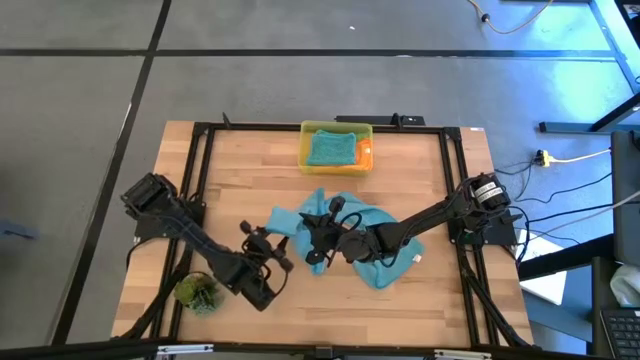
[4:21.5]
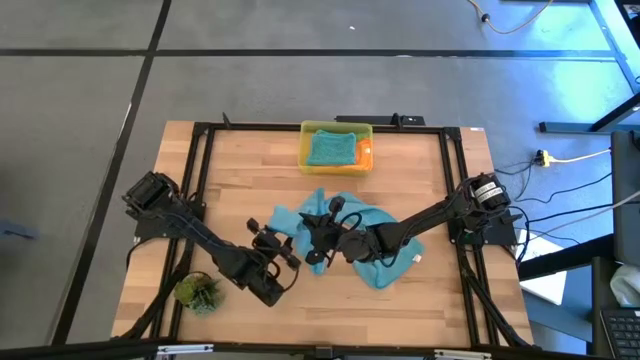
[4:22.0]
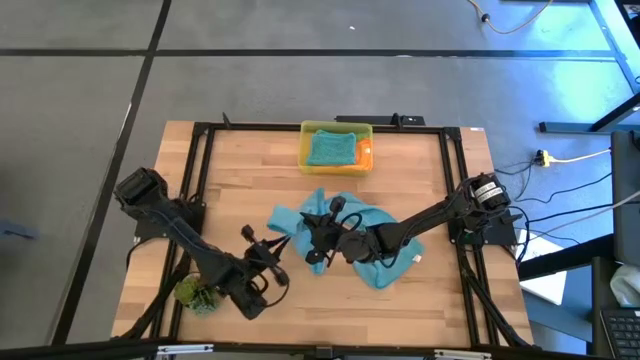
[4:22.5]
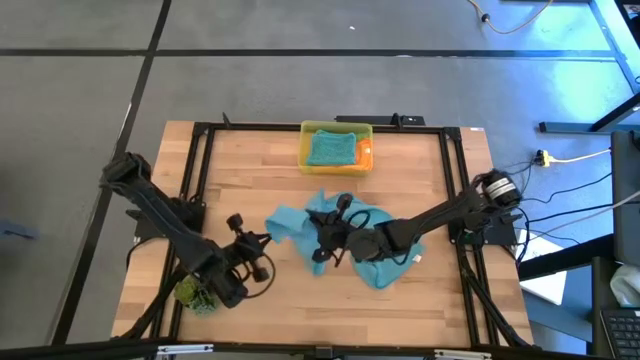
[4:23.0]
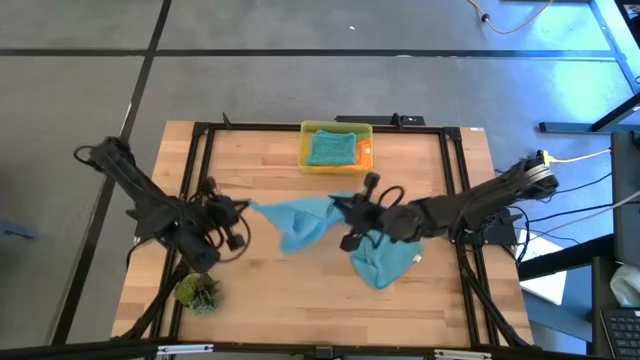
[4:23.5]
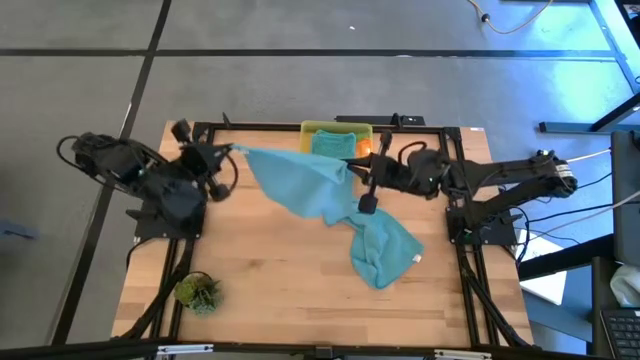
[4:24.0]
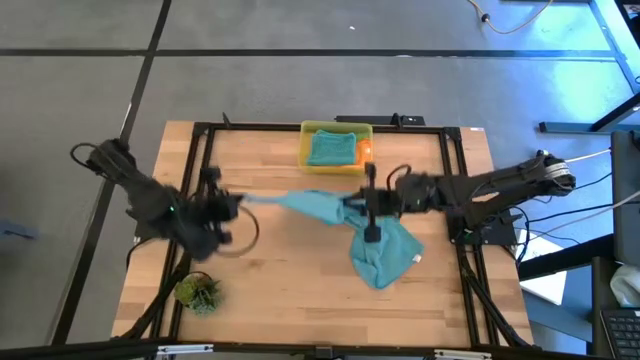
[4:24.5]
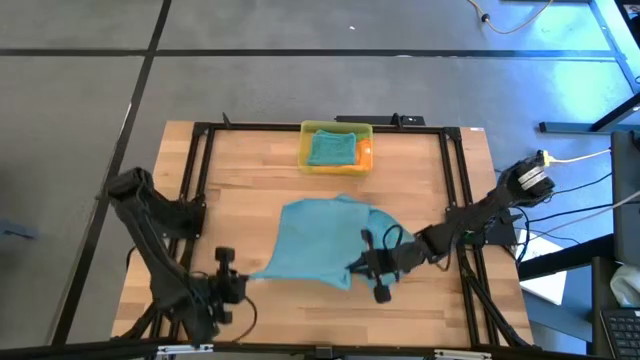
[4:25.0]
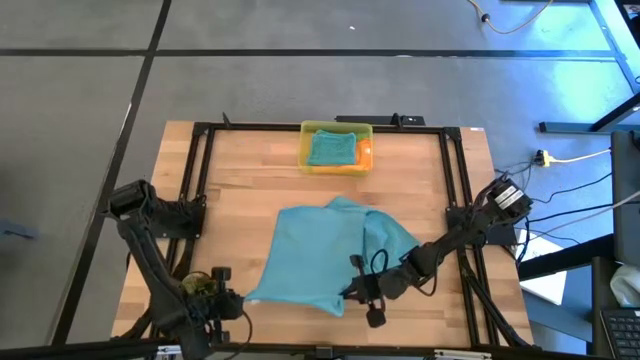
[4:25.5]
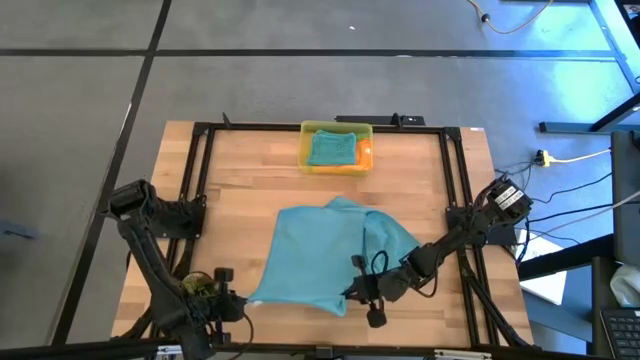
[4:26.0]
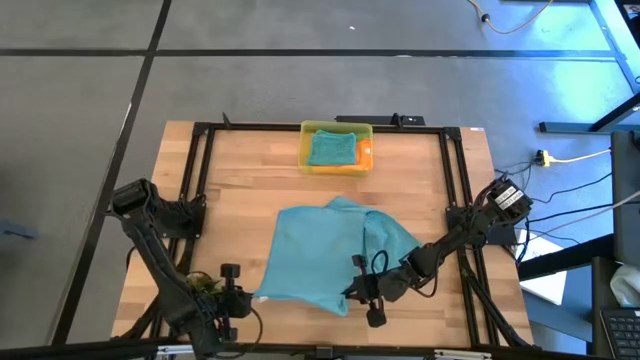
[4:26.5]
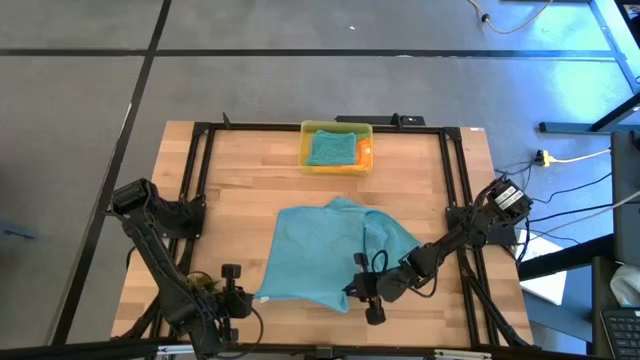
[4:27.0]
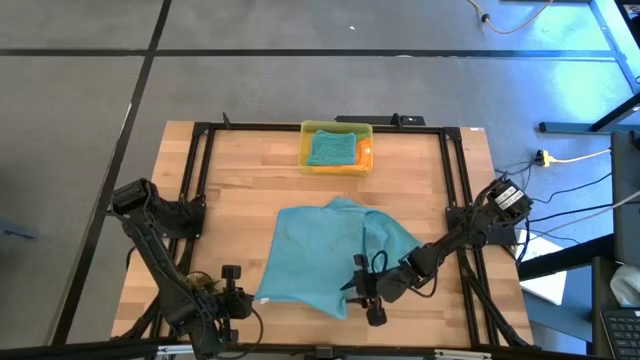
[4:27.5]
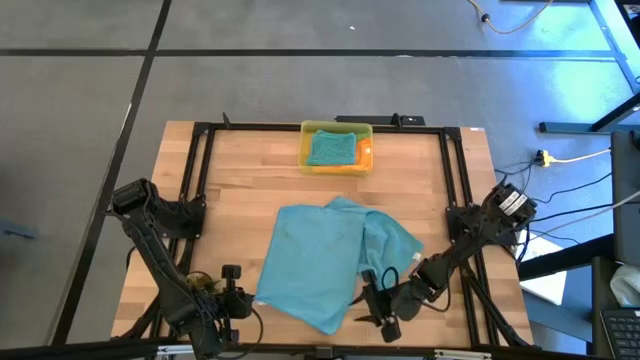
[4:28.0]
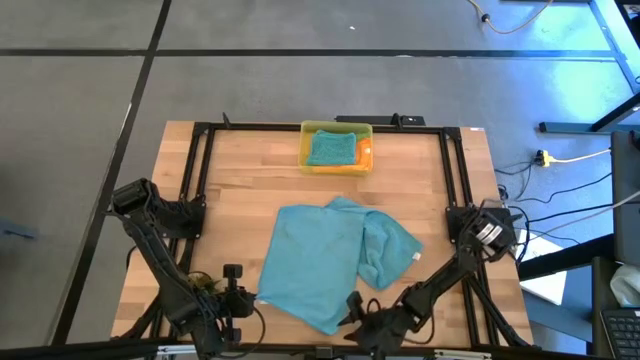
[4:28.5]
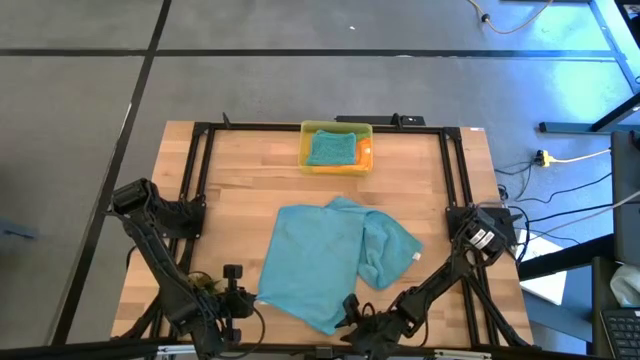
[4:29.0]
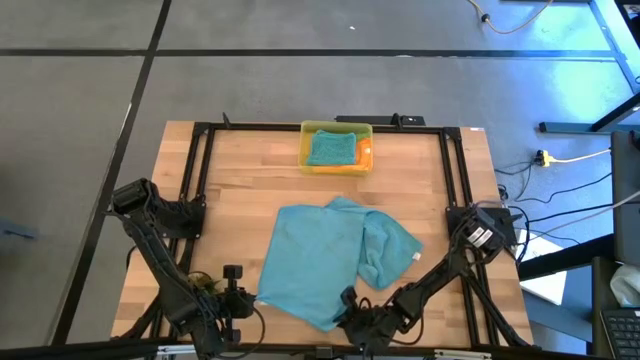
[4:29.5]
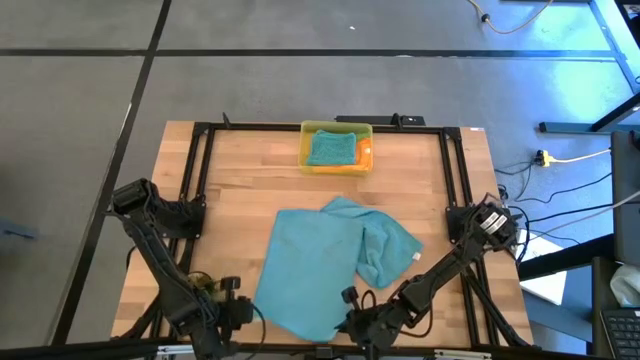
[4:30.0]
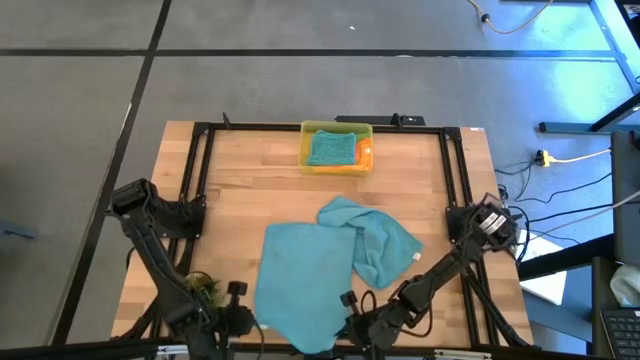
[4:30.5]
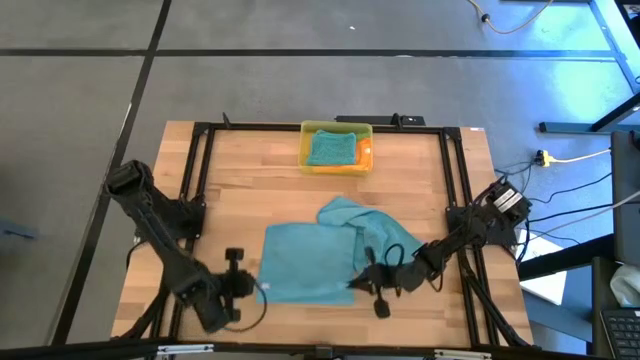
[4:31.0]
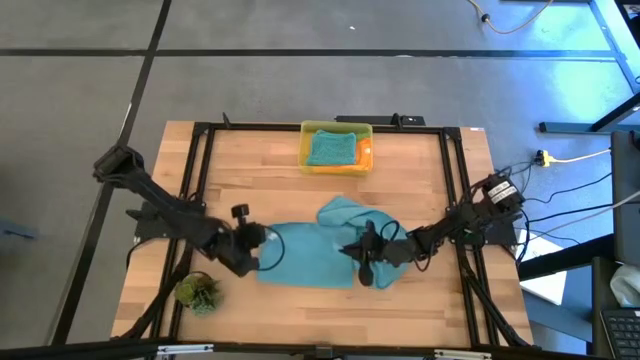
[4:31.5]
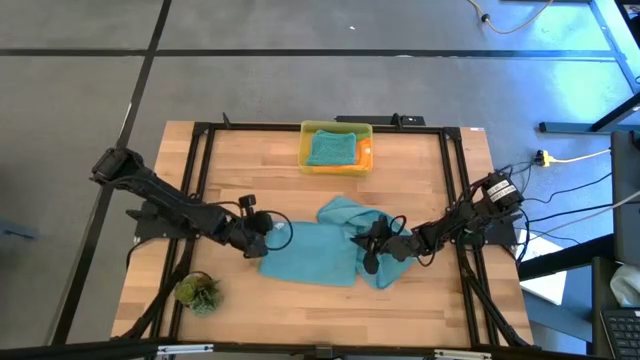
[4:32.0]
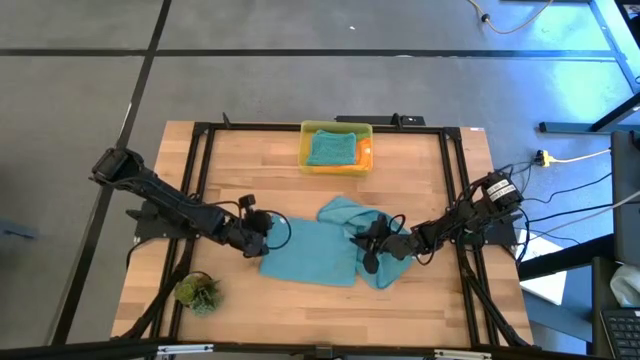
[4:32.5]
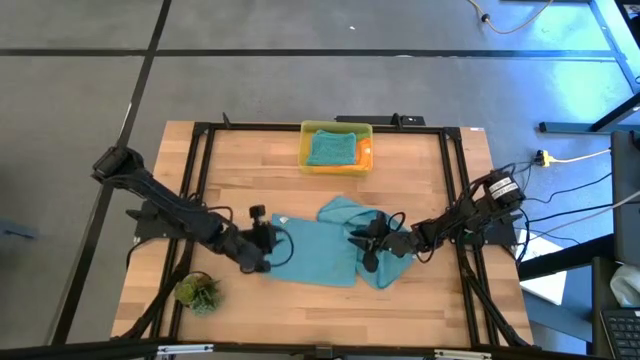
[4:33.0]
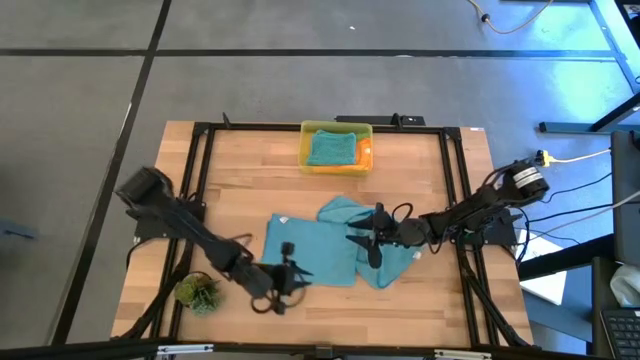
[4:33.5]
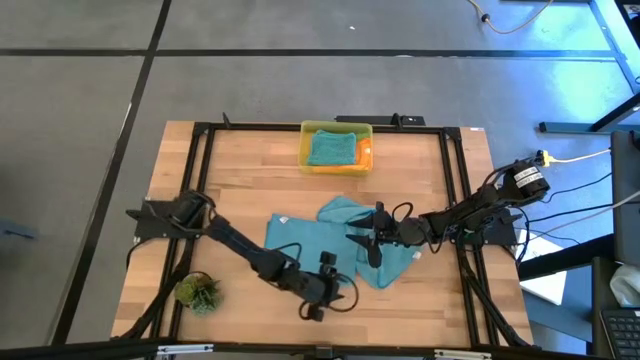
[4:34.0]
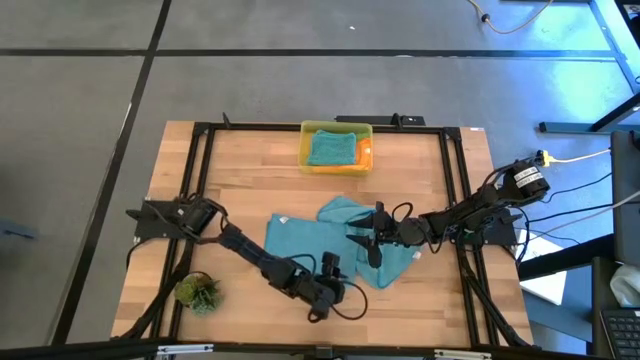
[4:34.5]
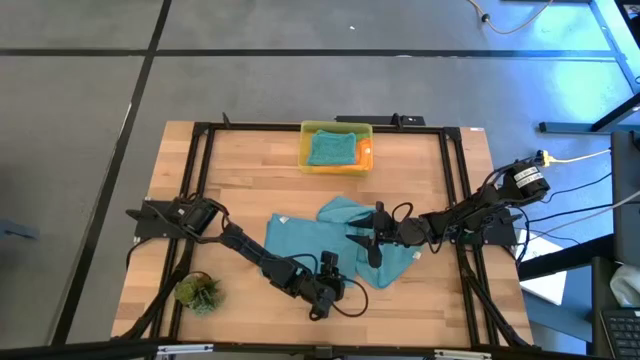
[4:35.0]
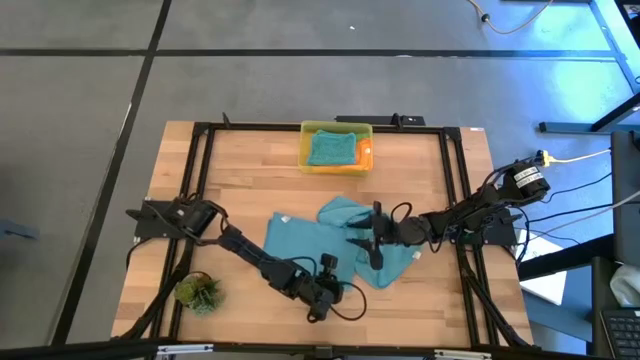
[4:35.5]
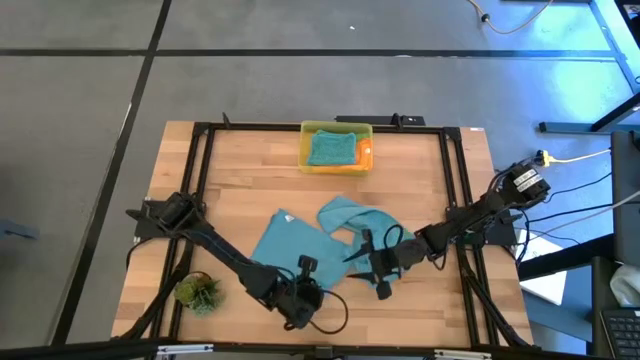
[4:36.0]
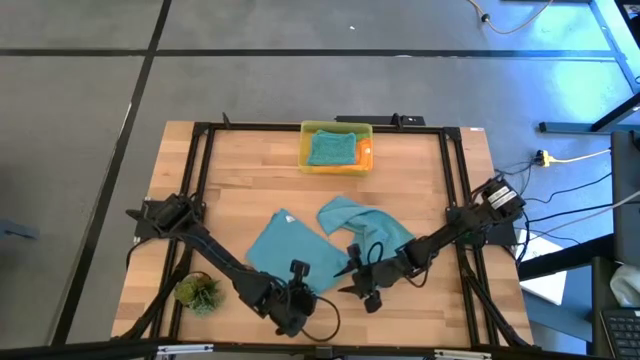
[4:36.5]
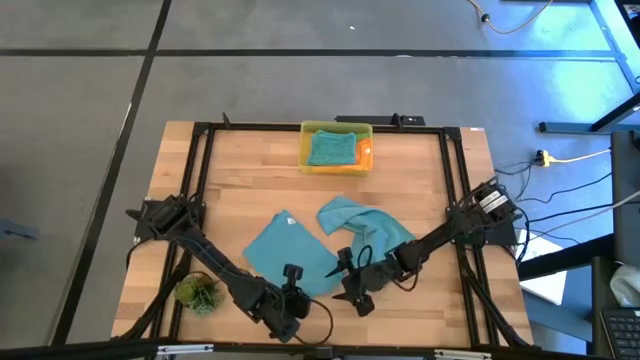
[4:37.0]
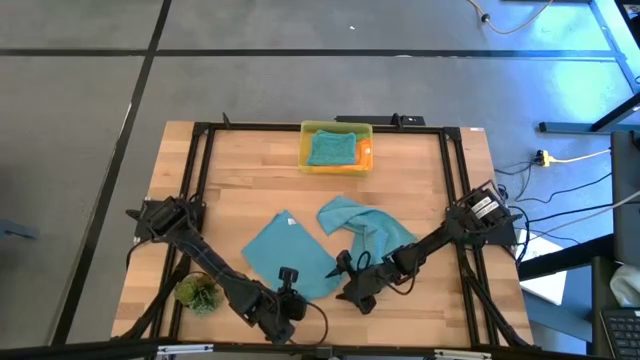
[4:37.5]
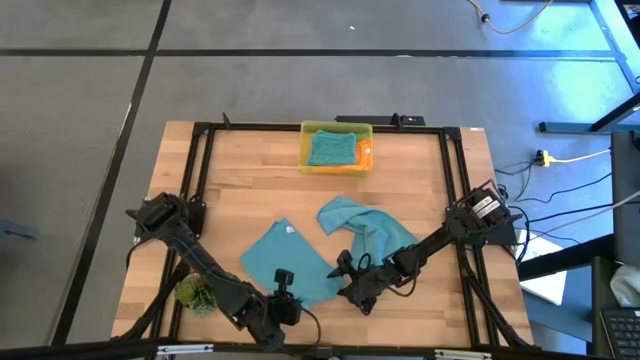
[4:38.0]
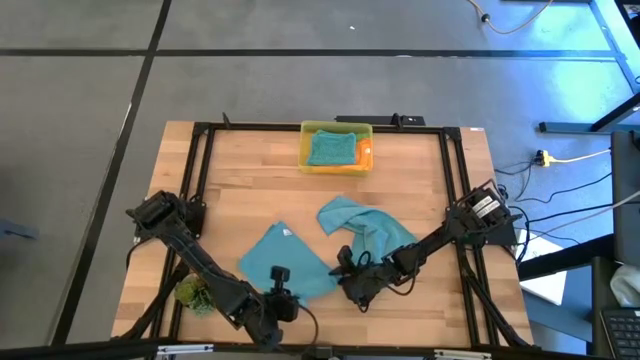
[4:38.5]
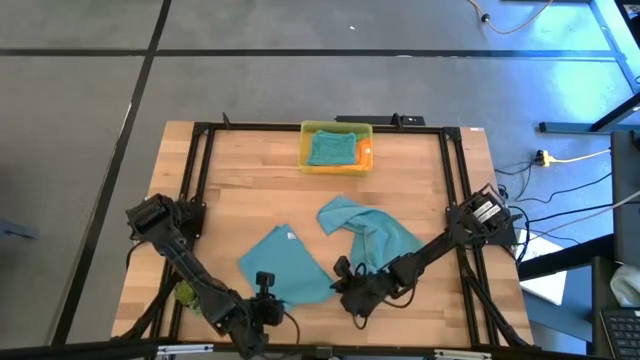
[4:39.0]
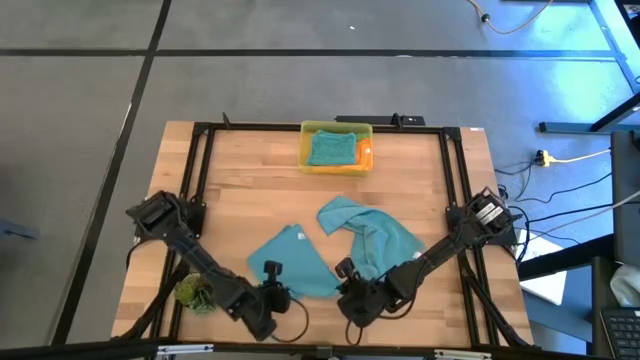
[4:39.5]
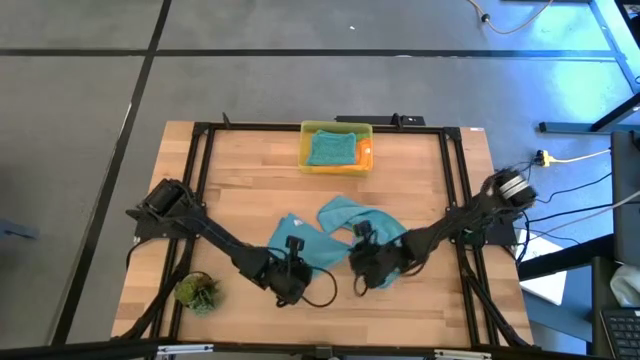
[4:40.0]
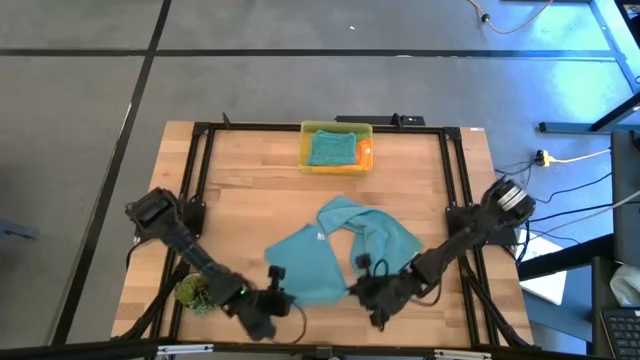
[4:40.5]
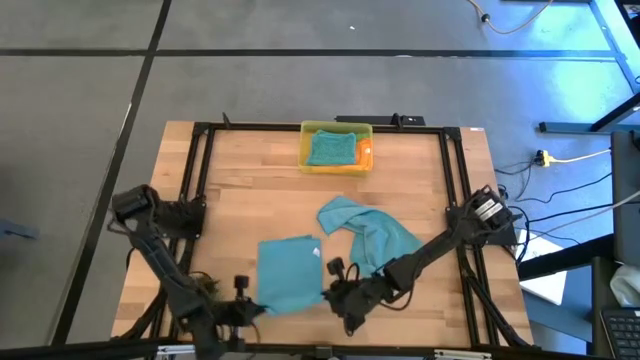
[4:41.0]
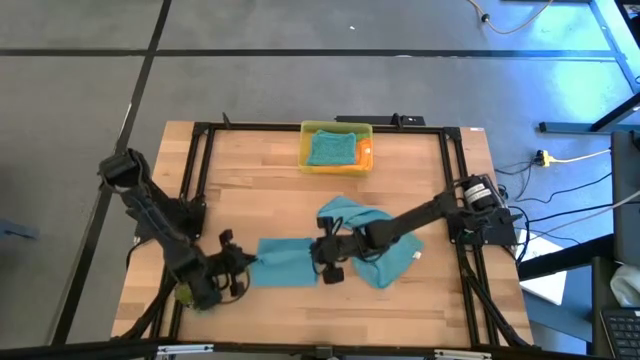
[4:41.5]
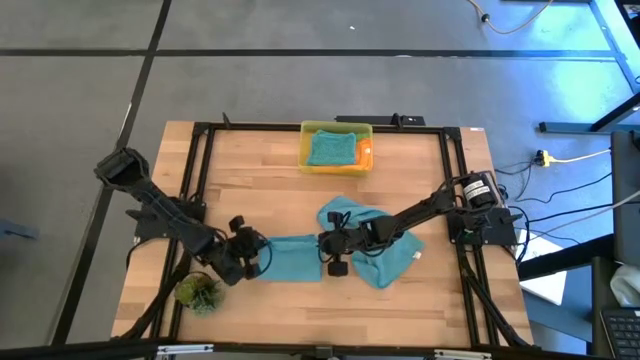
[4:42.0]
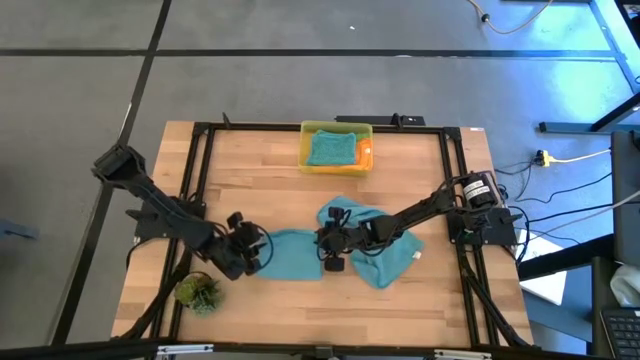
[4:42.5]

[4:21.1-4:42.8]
Task: Fold microfiber towels
Fold the top blue microfiber cloth
